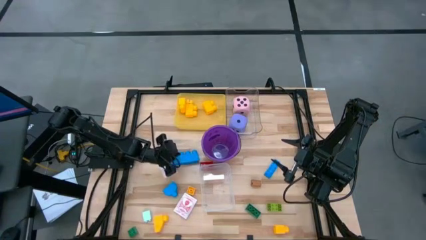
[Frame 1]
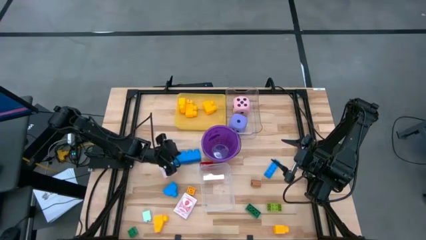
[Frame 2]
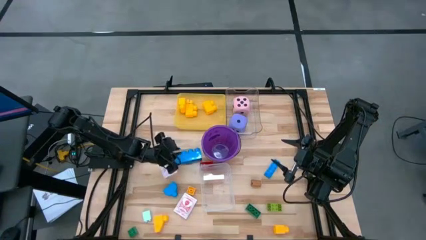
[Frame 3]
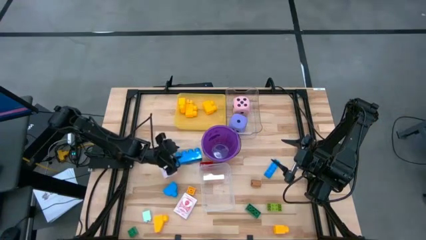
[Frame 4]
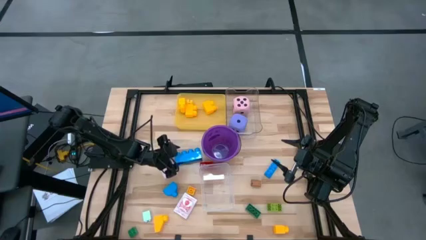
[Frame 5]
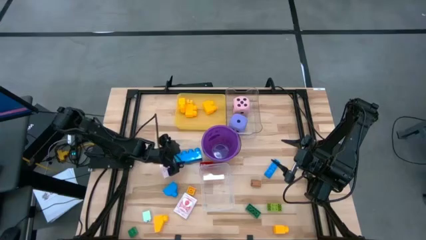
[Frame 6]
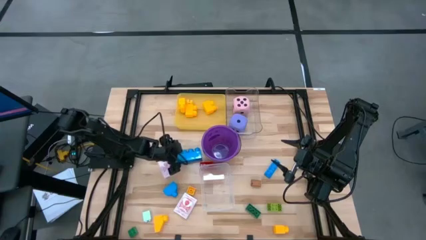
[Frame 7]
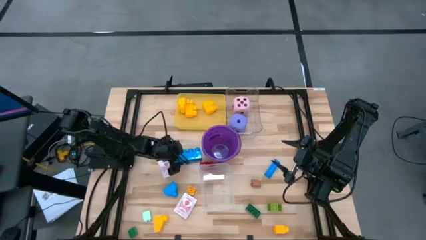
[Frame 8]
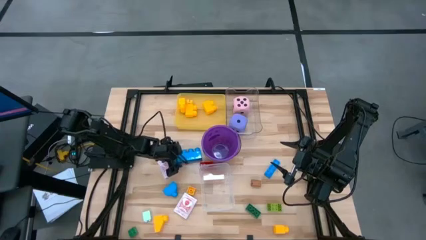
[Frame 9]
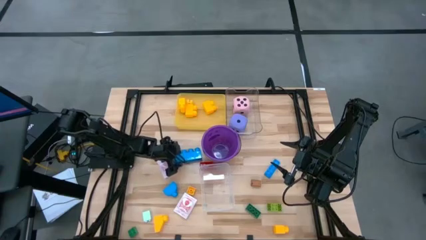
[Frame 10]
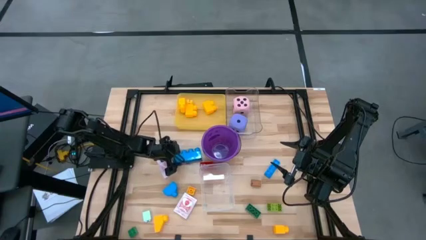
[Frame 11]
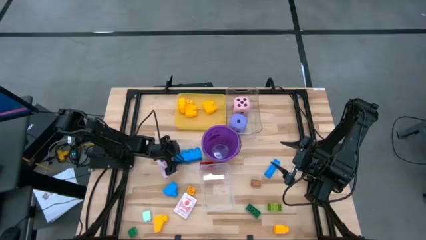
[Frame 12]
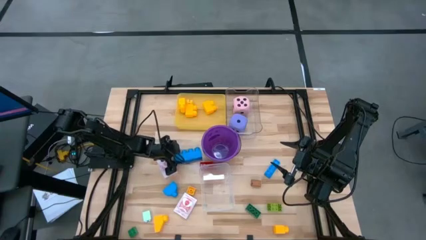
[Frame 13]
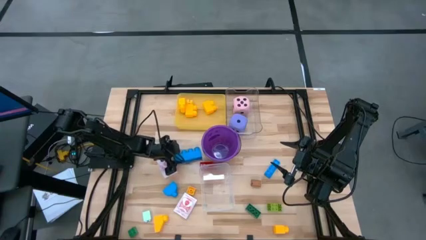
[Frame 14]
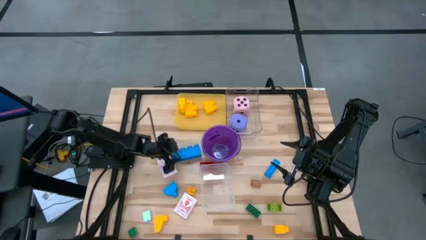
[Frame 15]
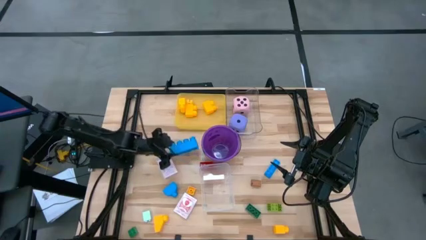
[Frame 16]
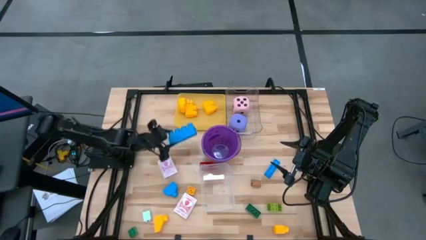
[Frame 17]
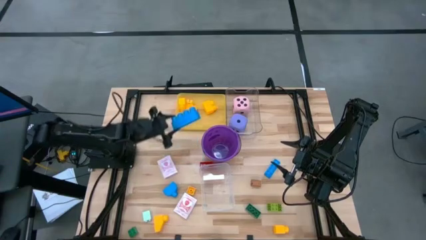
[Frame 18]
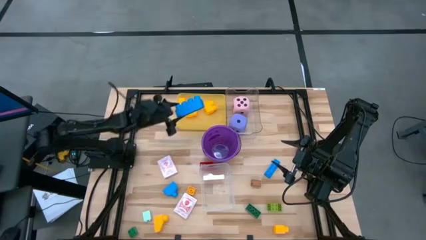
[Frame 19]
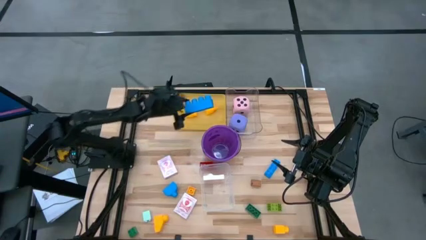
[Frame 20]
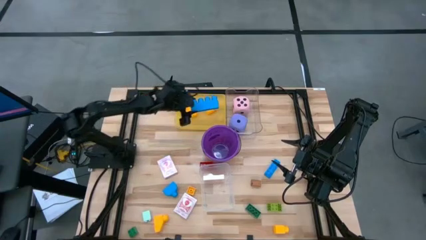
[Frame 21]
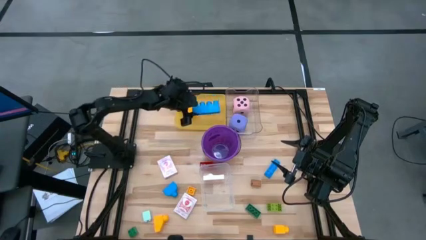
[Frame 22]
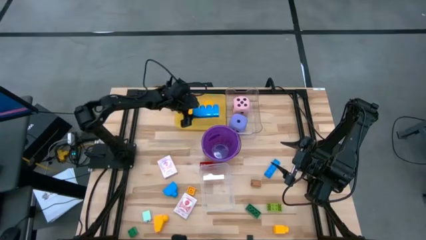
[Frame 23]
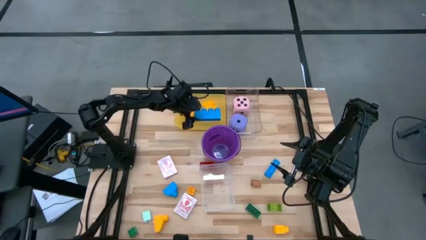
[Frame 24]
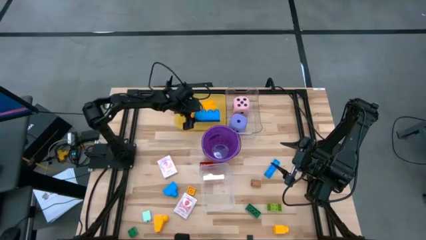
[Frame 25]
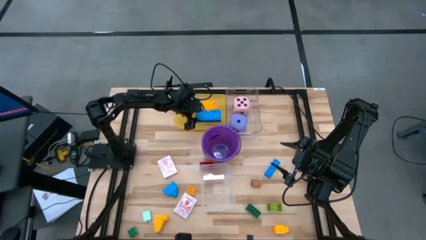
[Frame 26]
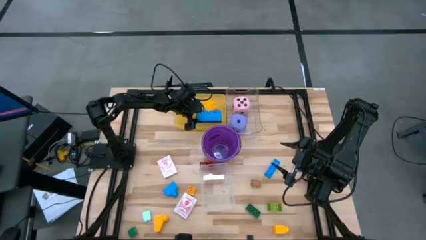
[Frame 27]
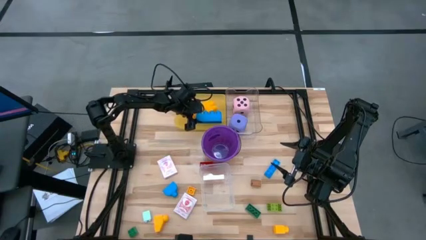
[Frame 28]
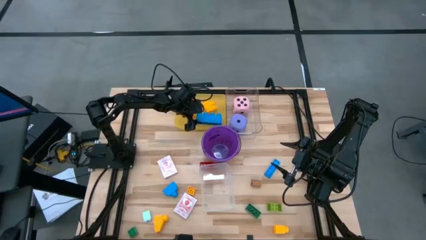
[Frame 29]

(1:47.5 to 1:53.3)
Task: Pick & Place Toys
Put the blue game piece into the yellow bin

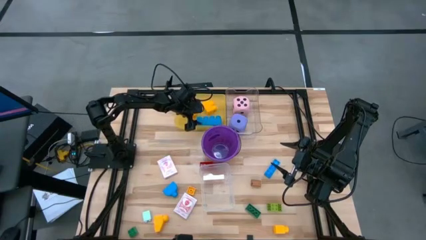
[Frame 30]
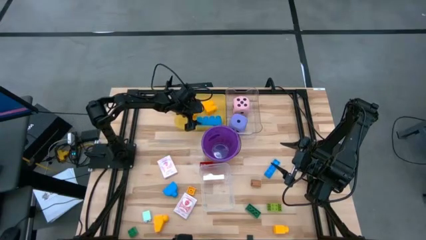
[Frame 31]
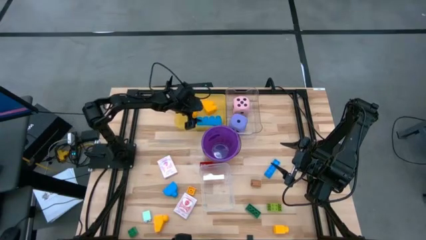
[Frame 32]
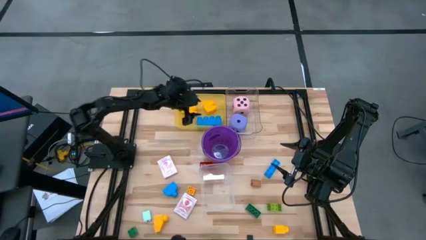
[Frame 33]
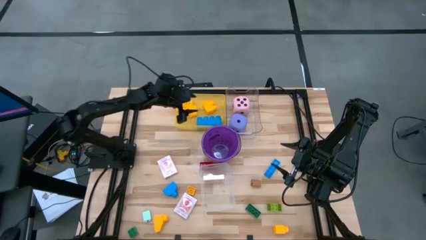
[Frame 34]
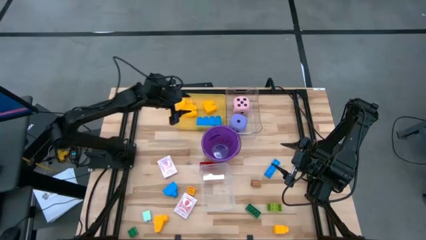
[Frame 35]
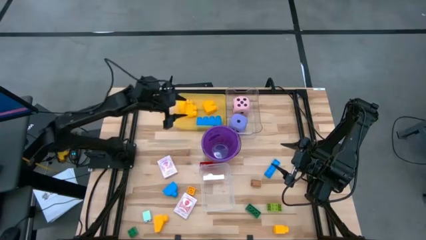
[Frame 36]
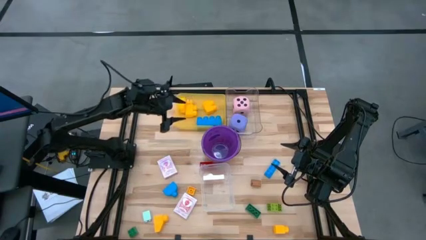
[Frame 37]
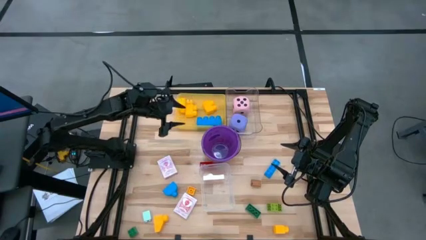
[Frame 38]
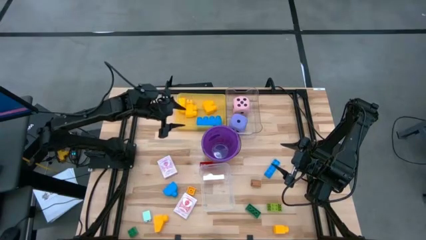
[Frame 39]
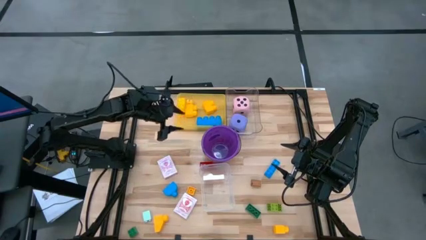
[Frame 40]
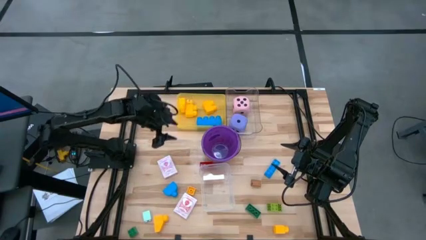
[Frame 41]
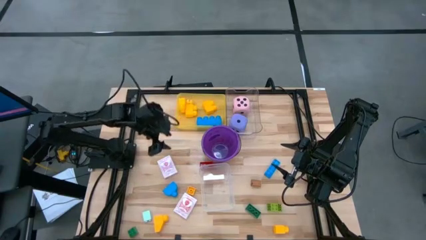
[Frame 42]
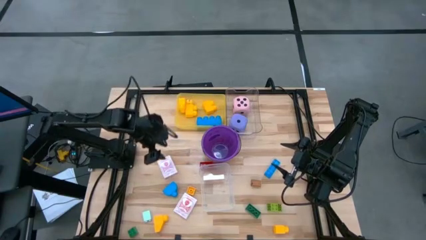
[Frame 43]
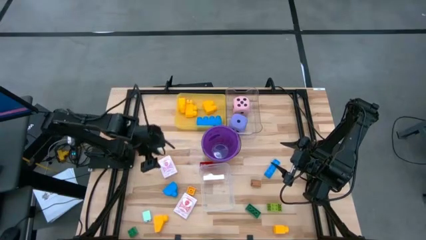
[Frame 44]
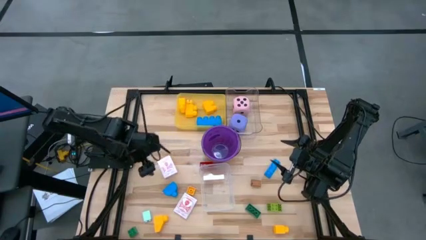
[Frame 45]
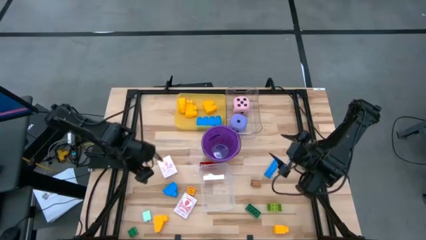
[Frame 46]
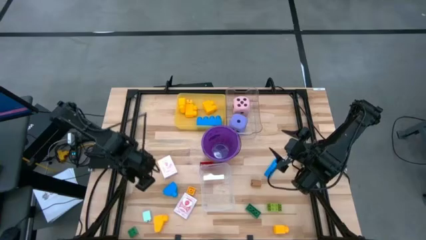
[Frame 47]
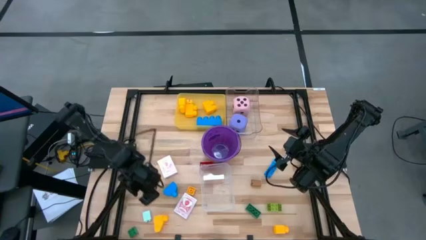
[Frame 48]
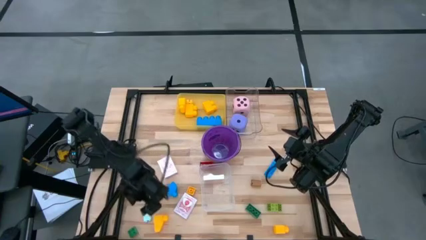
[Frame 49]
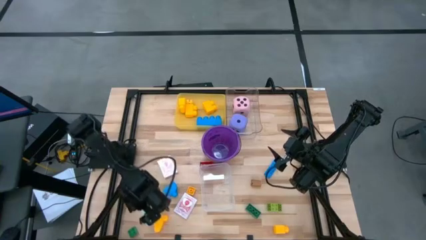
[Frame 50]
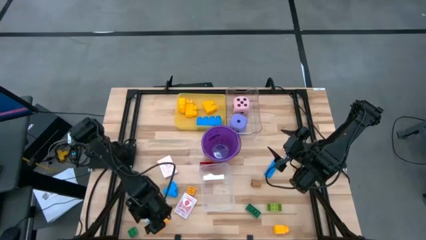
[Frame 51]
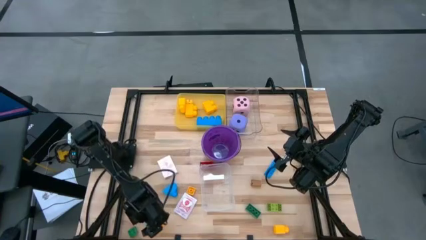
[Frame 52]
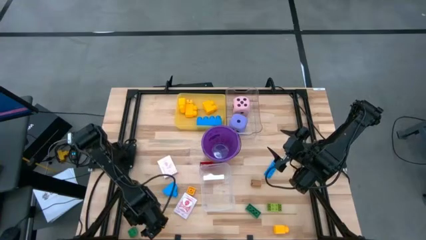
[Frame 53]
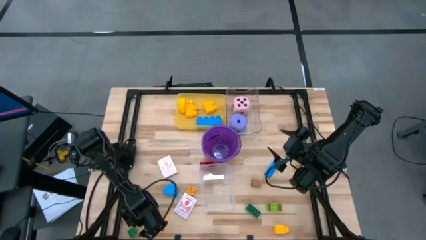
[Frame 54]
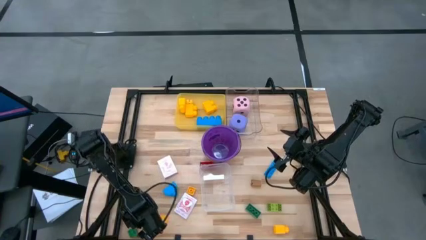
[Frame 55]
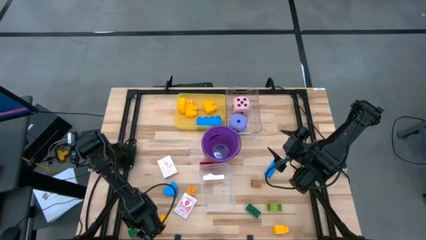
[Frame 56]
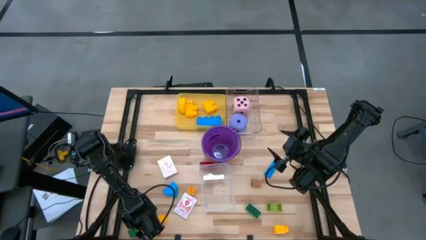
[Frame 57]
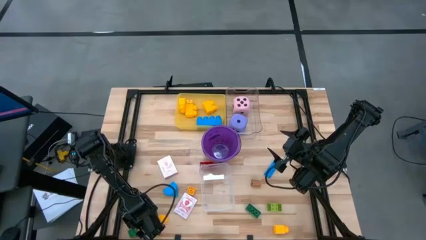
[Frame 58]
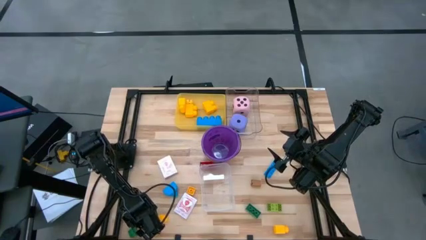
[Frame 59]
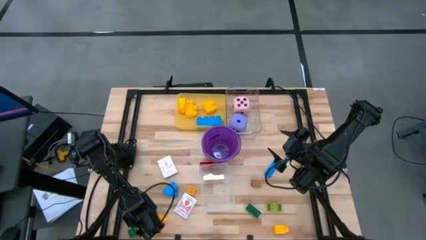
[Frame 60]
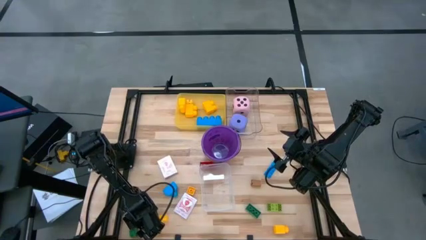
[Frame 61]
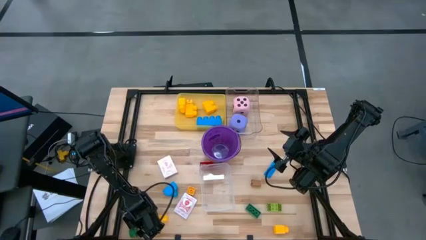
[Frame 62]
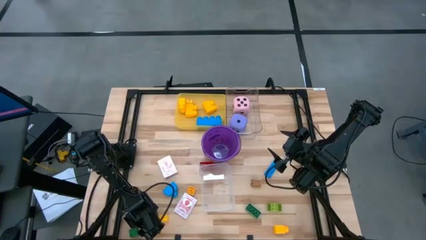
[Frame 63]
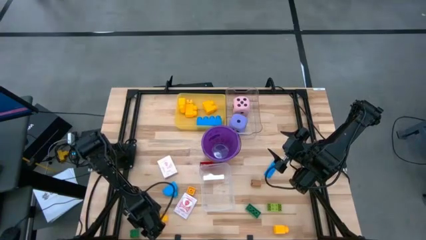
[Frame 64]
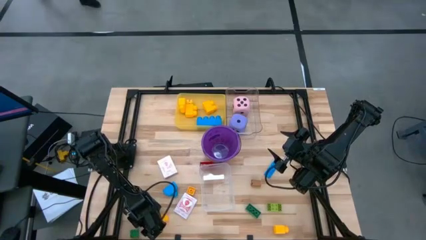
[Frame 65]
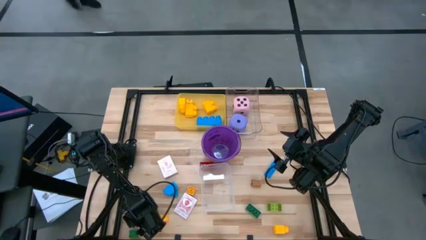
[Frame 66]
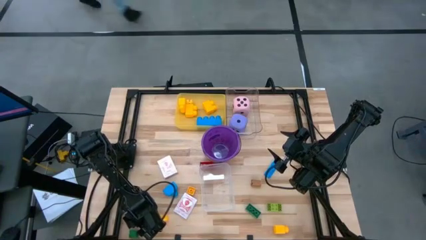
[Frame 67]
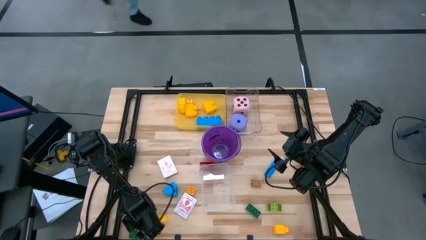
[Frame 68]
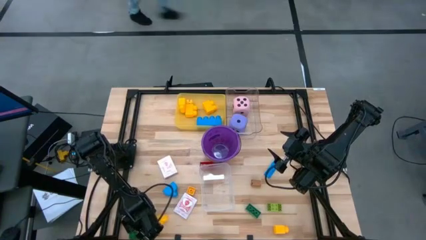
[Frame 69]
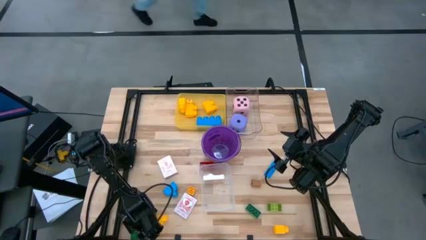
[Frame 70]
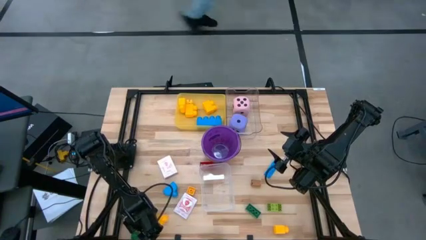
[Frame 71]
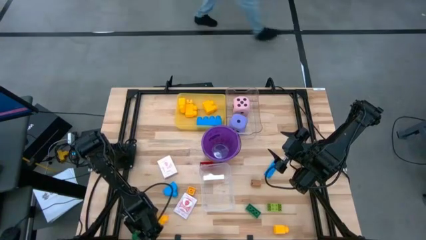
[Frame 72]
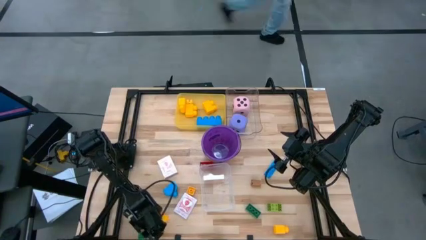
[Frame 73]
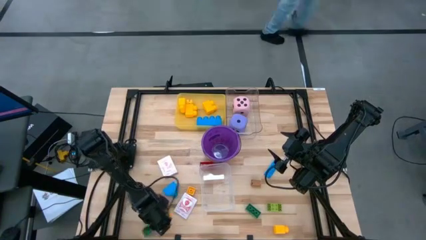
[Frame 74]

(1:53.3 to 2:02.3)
Put the green game piece into the yellow bin

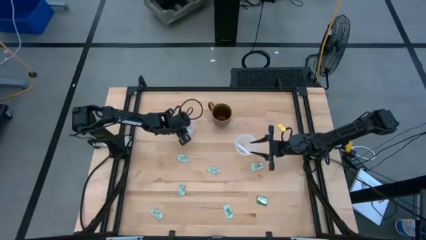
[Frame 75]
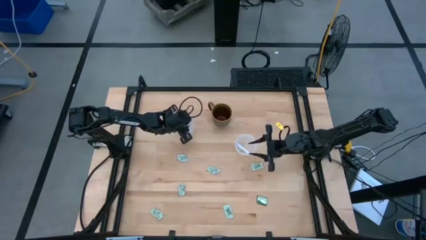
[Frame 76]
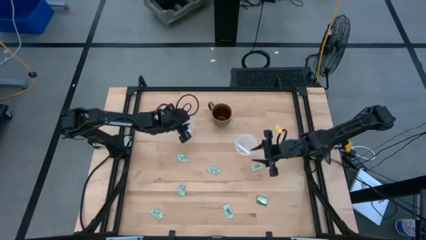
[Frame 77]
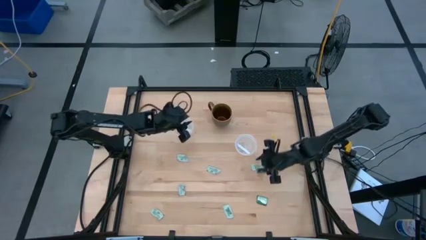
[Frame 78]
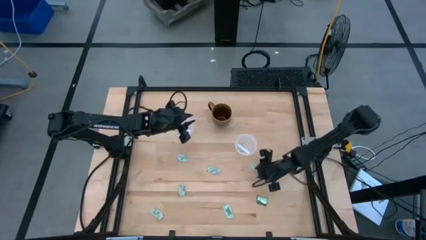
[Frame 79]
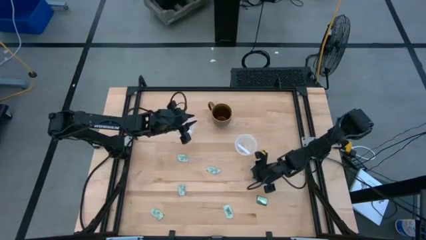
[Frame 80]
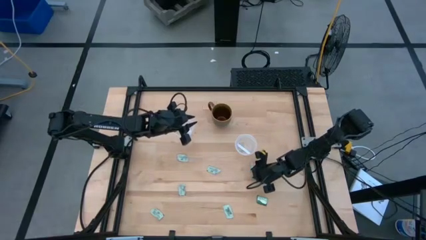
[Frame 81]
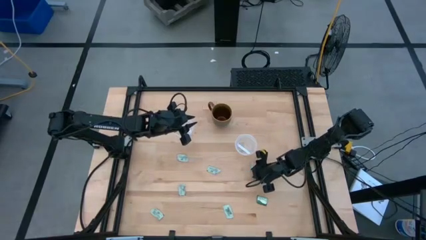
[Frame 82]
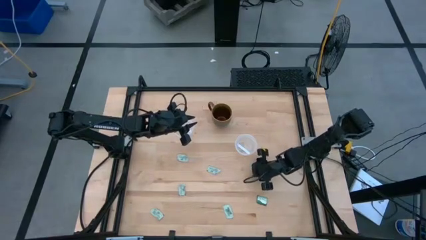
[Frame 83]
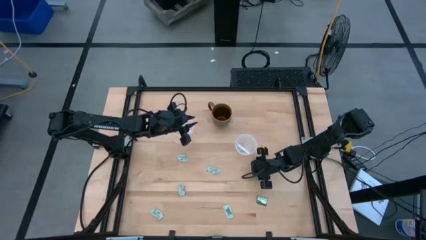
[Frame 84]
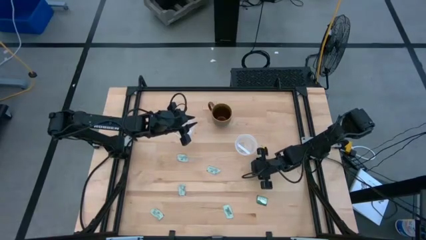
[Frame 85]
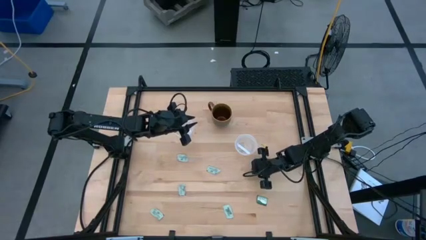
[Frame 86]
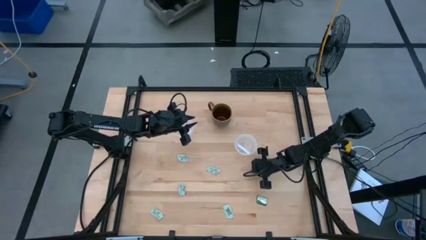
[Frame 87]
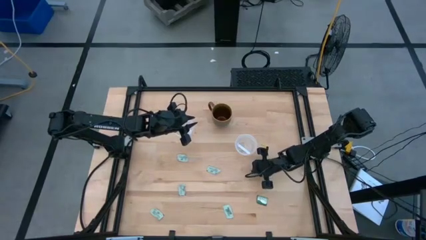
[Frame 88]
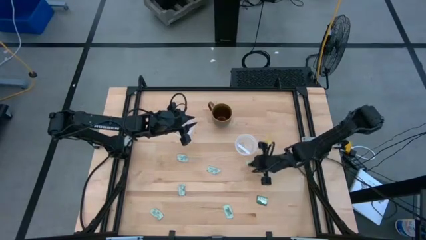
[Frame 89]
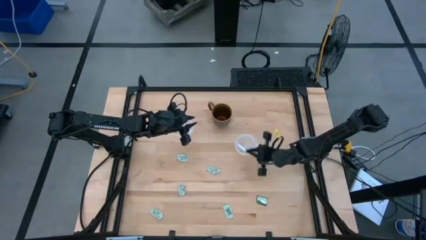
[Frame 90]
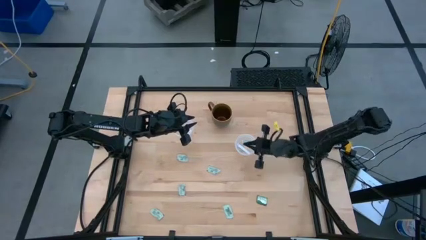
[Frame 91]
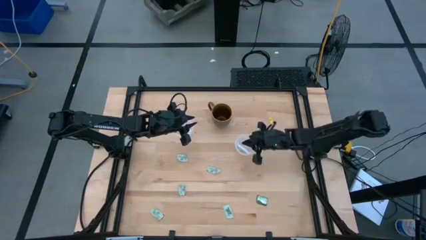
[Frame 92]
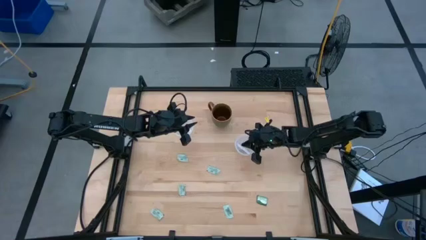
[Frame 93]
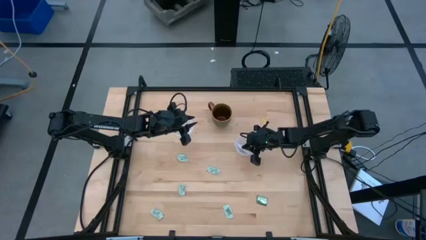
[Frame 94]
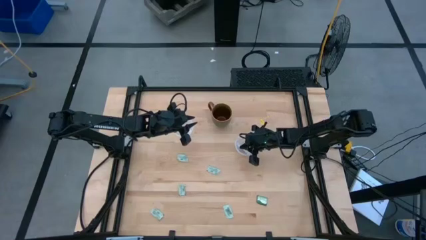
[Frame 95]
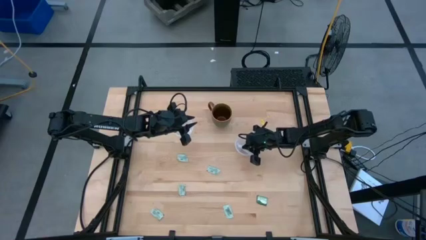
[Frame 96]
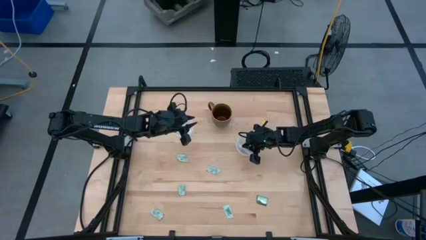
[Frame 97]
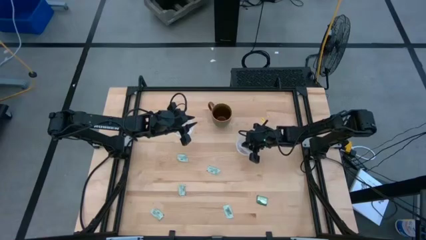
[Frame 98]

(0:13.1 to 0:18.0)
Task: Pick and place Stevia / Truvia into bins
Put the white stevia packet into the right round transparent container
